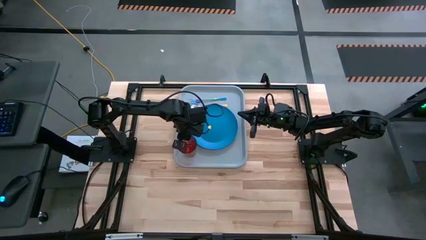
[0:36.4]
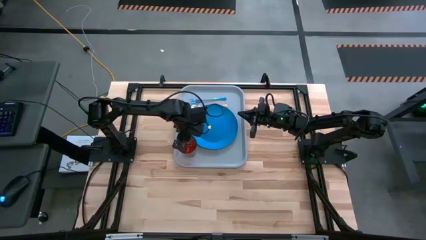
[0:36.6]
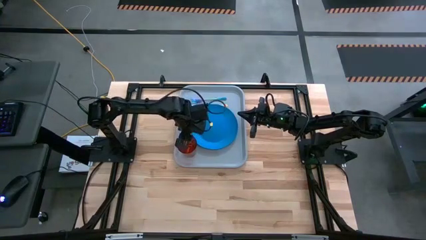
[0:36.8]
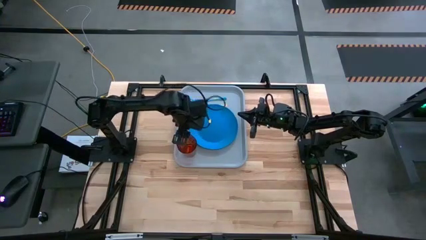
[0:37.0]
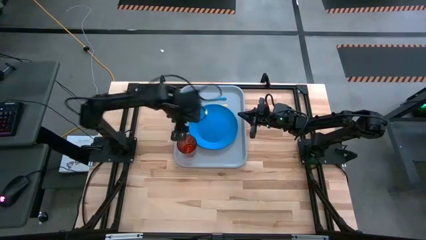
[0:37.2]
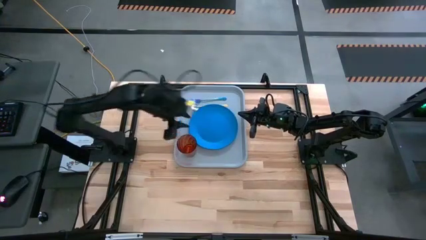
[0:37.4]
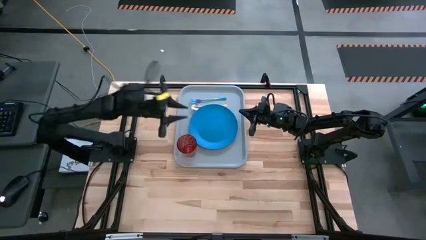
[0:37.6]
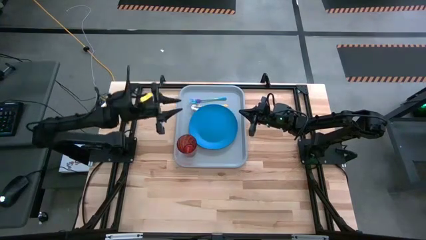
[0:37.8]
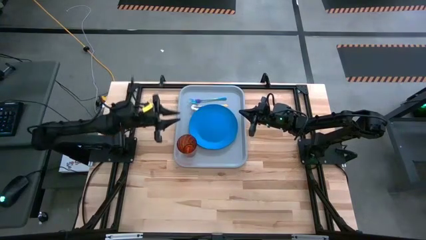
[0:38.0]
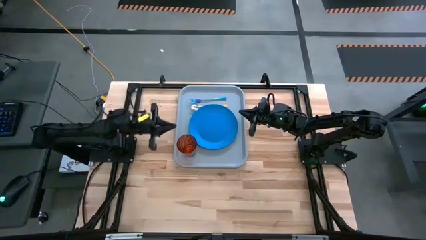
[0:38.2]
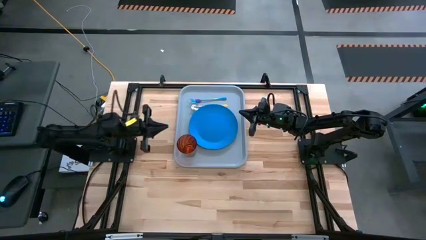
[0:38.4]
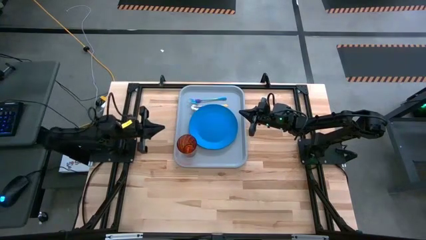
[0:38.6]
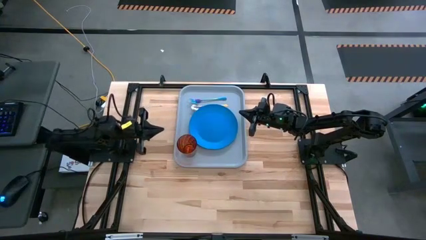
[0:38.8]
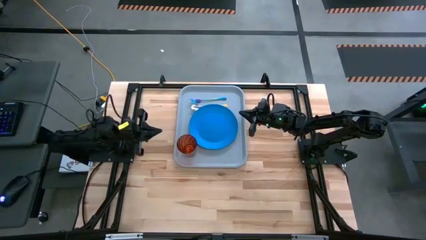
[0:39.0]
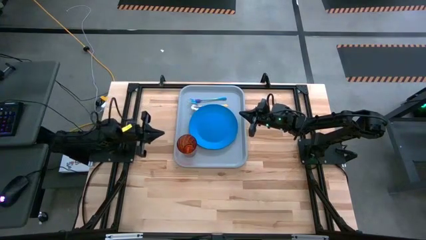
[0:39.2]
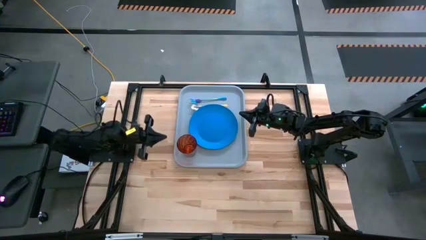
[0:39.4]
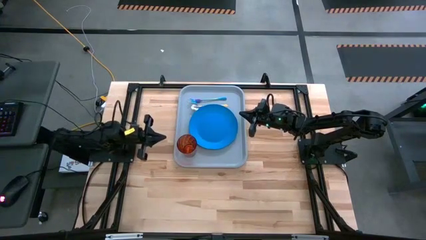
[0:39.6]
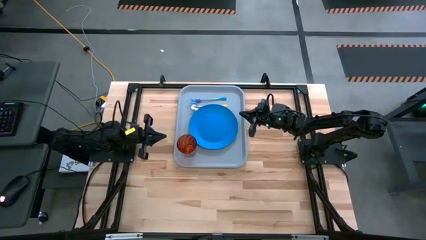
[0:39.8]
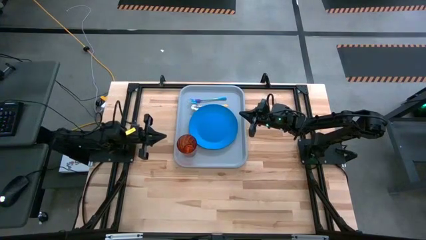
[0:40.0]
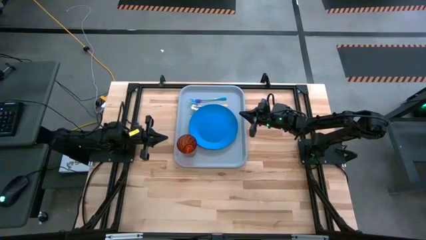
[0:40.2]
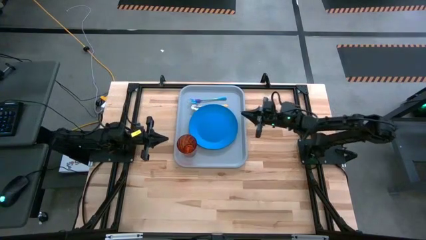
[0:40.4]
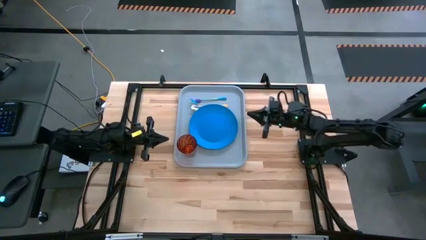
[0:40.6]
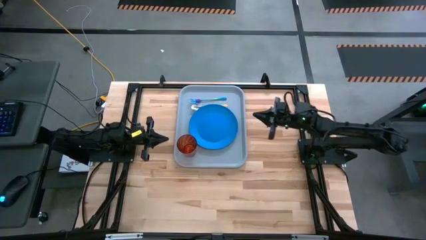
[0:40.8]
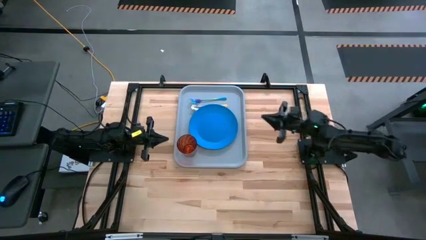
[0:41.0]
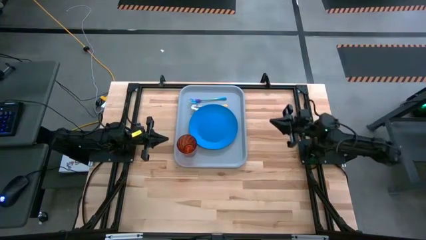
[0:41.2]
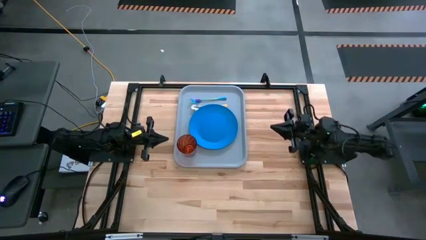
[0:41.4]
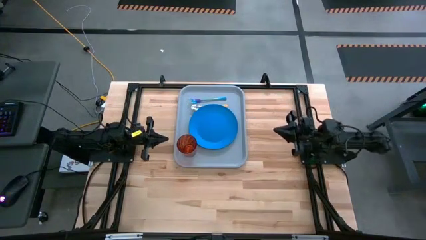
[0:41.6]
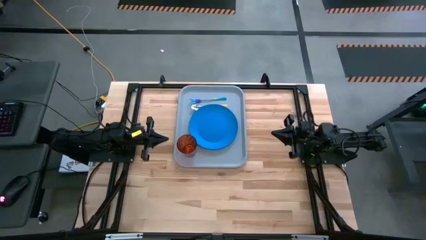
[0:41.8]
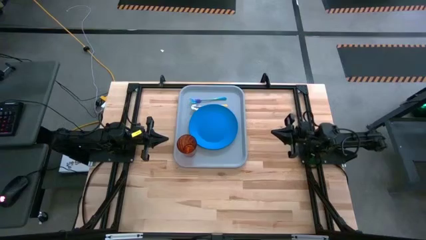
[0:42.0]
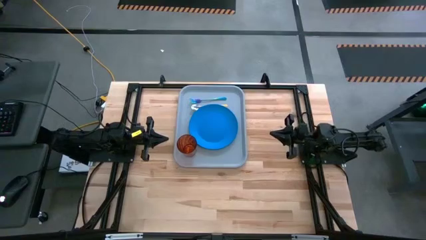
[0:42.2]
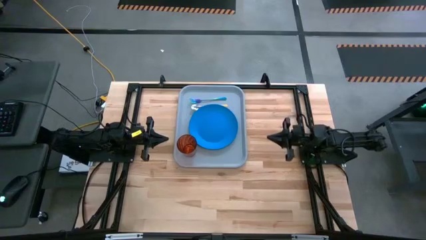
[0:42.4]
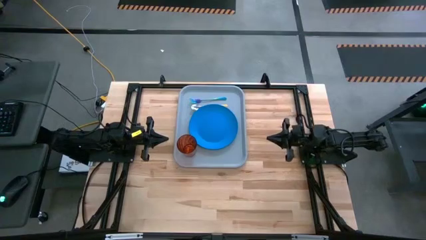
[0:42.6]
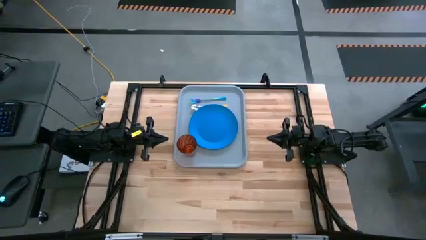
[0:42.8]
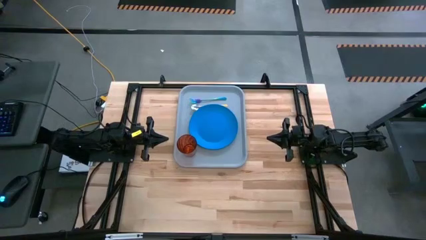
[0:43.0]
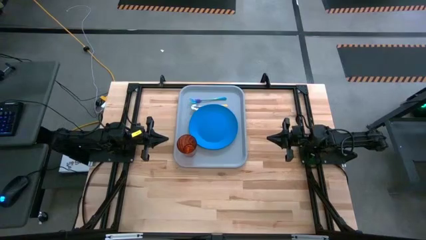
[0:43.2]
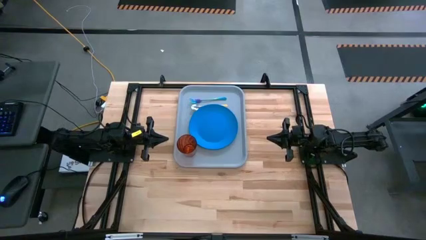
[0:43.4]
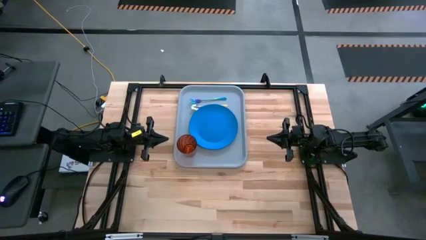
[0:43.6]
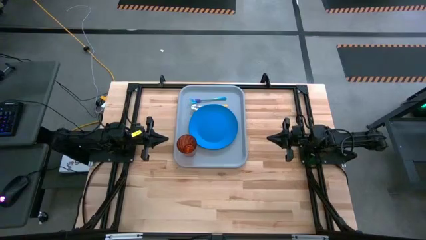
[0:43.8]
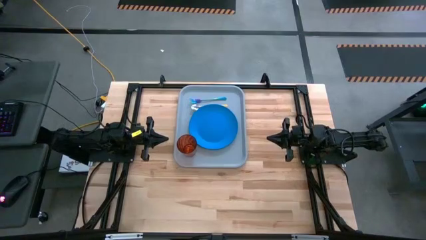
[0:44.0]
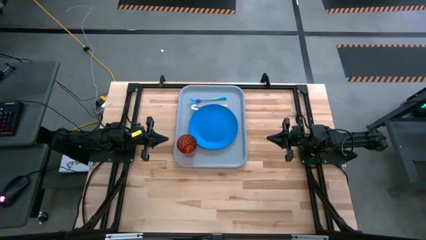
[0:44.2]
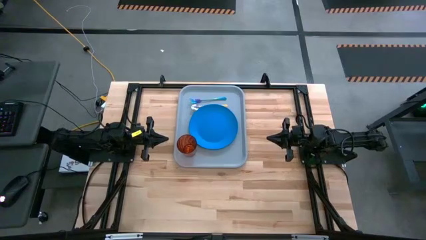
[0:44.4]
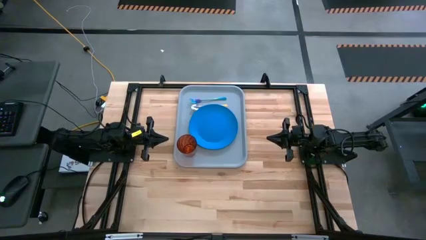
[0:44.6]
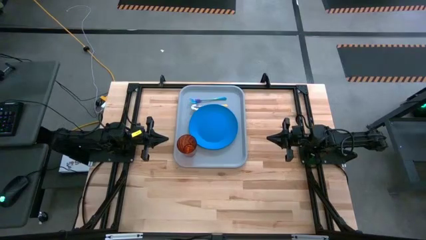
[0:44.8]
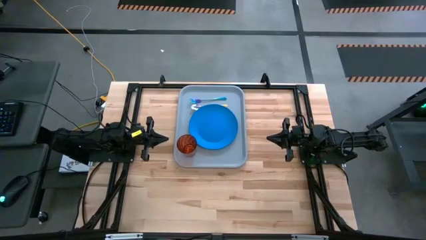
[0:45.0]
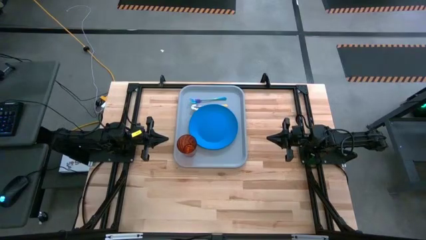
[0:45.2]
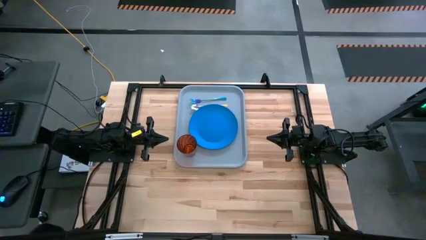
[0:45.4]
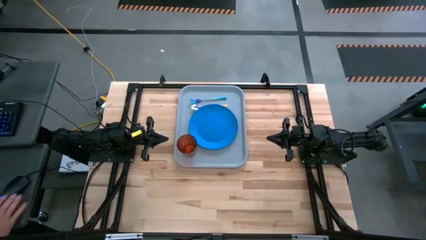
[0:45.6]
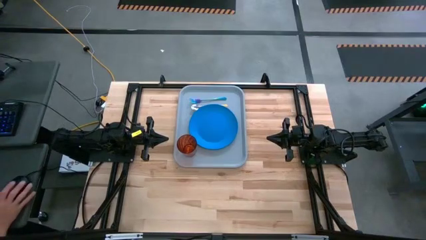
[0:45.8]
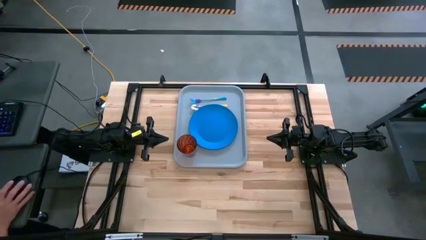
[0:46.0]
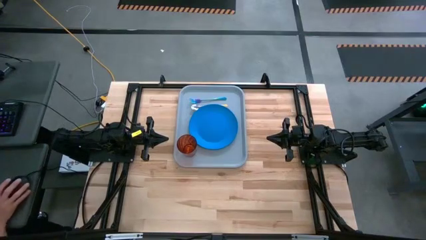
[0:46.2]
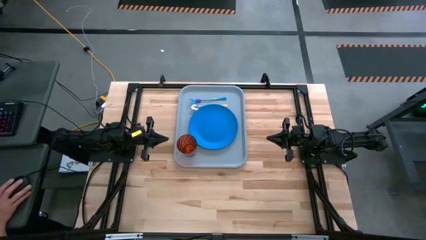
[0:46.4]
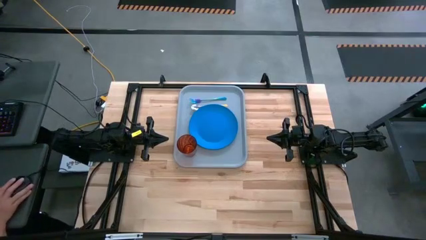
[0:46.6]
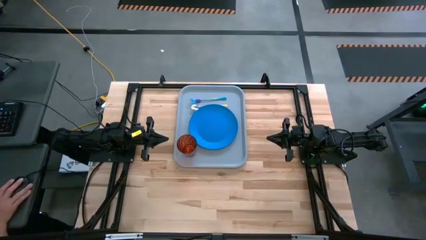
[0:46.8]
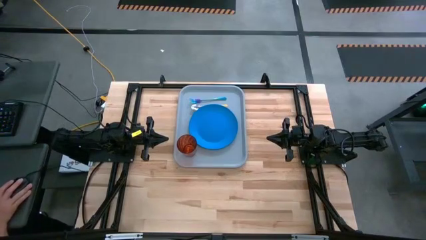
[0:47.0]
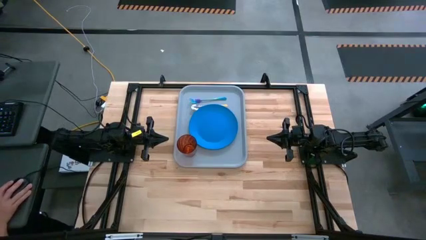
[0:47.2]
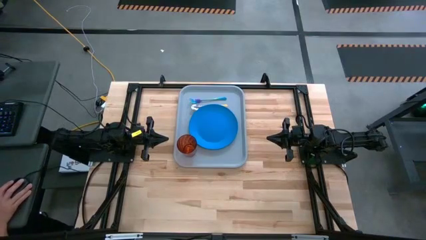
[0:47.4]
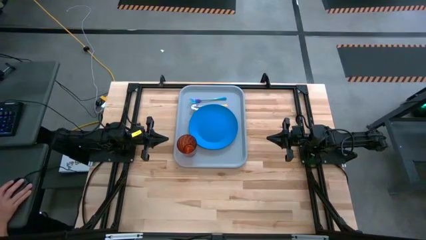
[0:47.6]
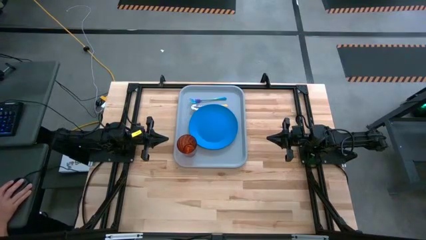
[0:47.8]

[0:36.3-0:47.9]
Task: Pick and place plate/cup/fork/spoon on tray
Return to Home Position
